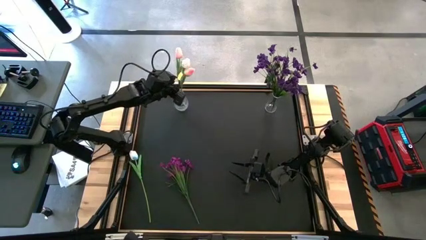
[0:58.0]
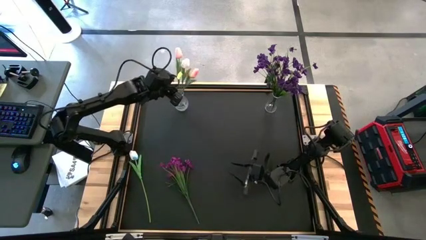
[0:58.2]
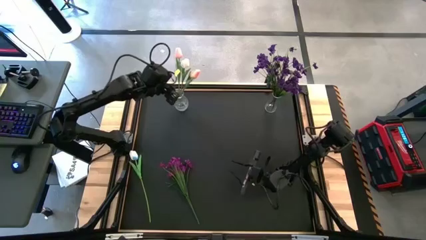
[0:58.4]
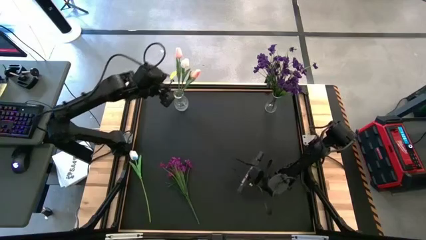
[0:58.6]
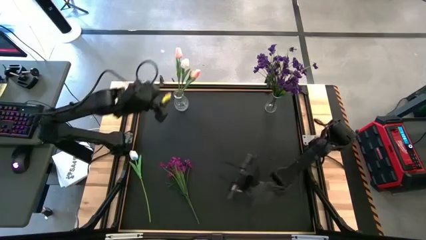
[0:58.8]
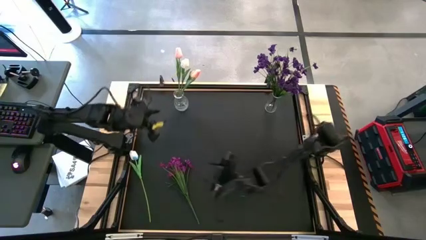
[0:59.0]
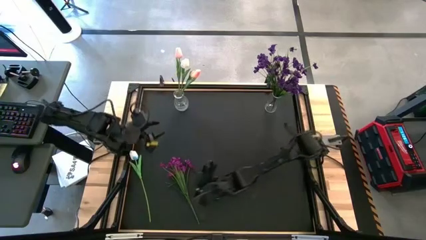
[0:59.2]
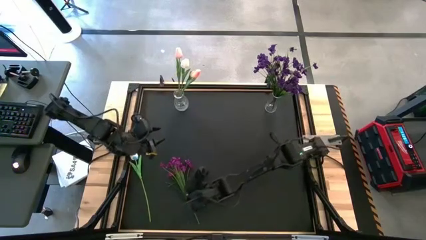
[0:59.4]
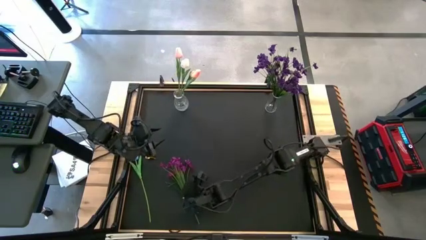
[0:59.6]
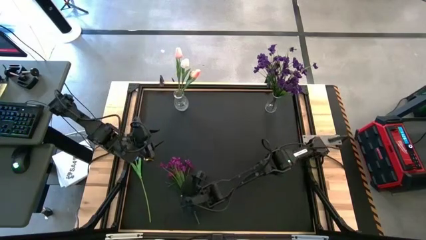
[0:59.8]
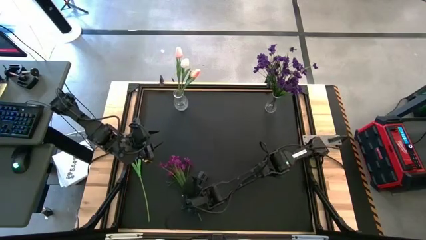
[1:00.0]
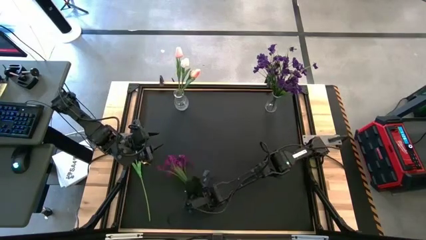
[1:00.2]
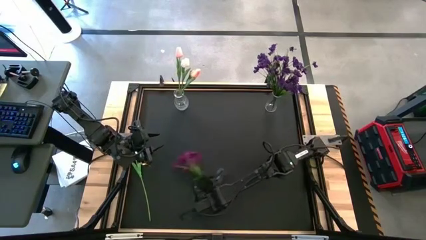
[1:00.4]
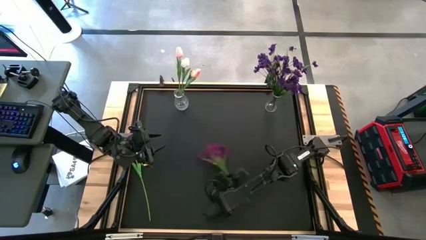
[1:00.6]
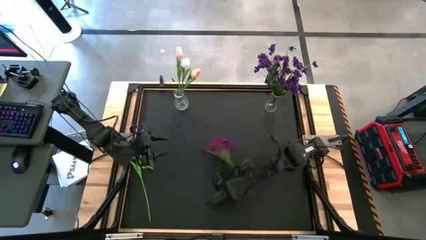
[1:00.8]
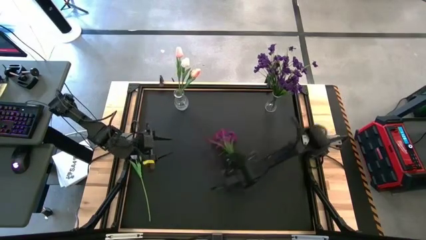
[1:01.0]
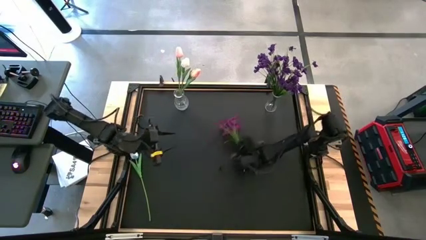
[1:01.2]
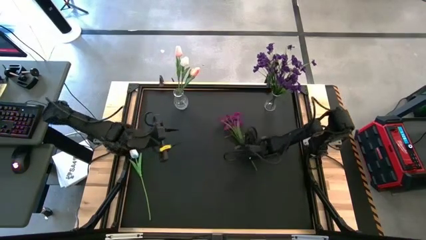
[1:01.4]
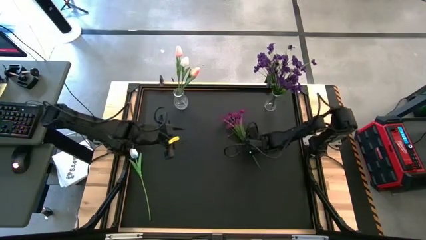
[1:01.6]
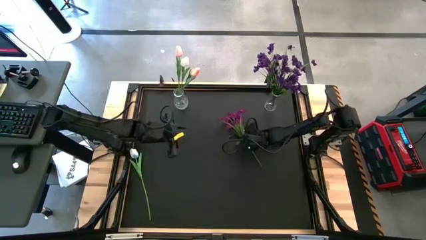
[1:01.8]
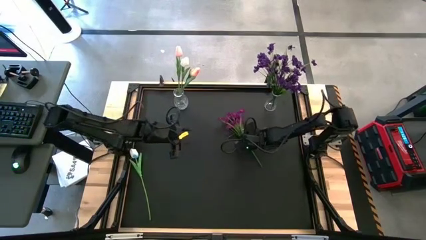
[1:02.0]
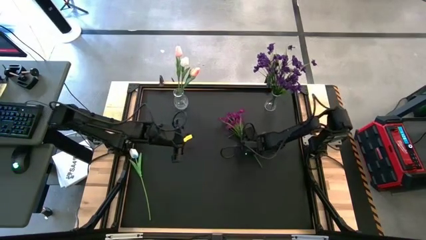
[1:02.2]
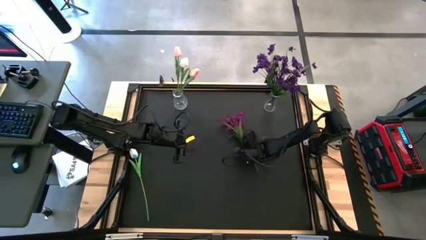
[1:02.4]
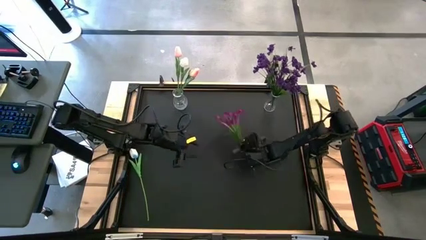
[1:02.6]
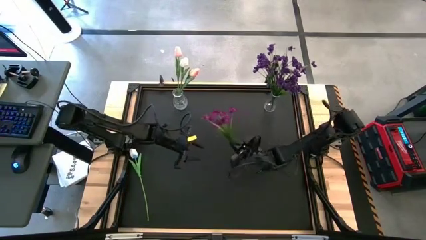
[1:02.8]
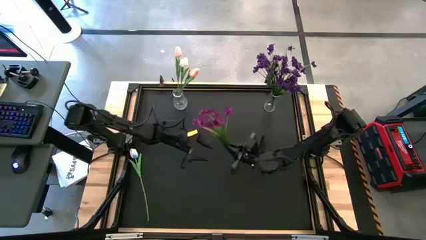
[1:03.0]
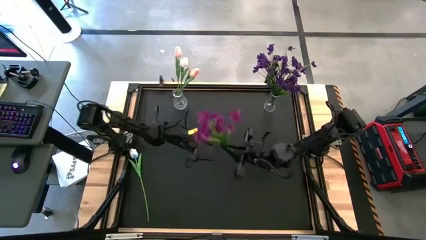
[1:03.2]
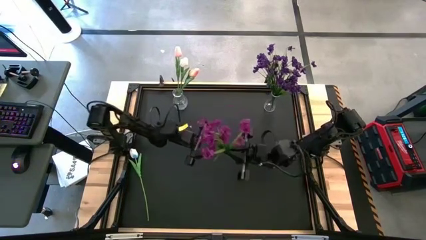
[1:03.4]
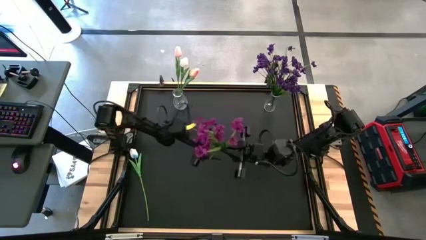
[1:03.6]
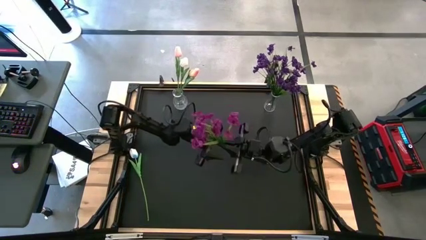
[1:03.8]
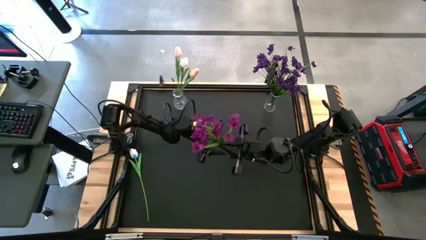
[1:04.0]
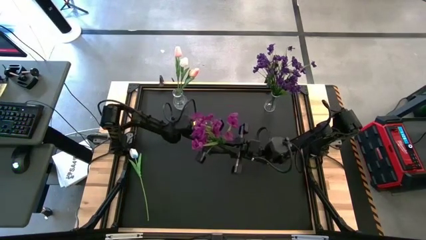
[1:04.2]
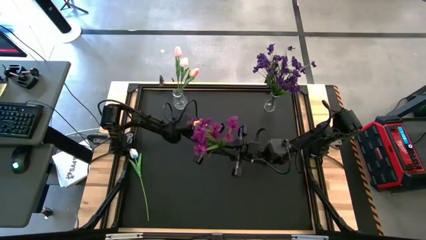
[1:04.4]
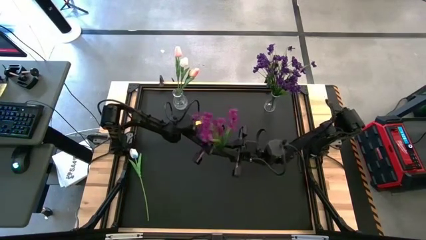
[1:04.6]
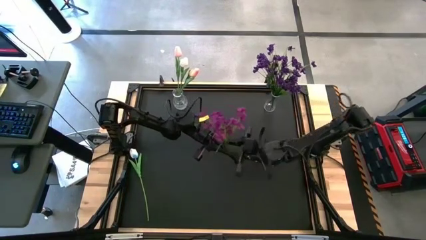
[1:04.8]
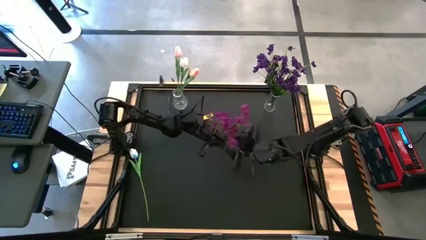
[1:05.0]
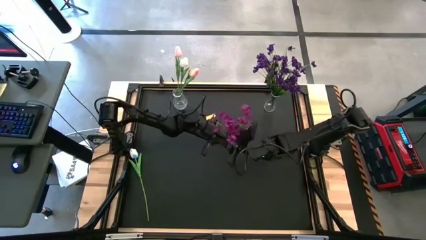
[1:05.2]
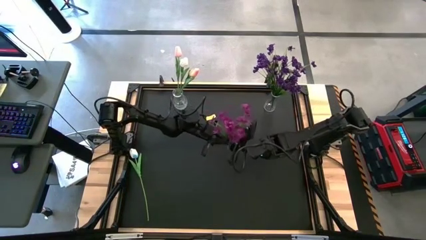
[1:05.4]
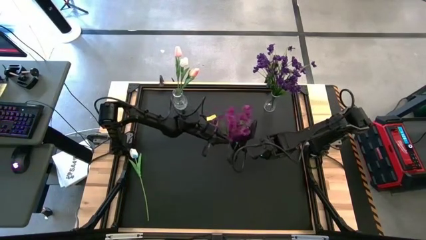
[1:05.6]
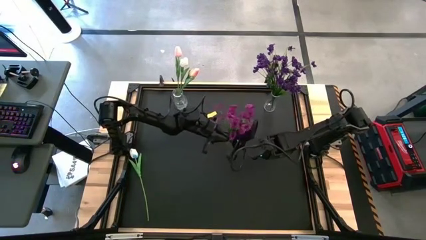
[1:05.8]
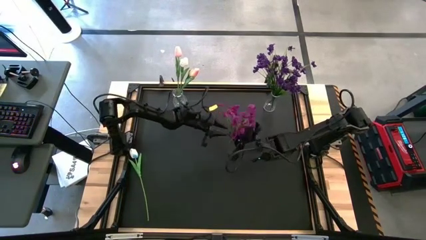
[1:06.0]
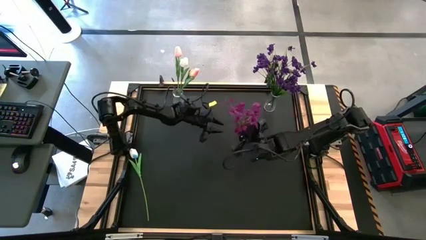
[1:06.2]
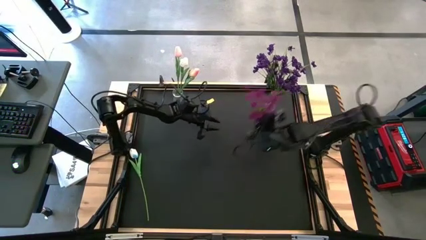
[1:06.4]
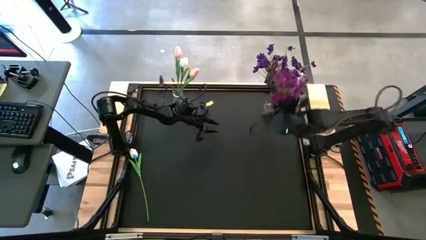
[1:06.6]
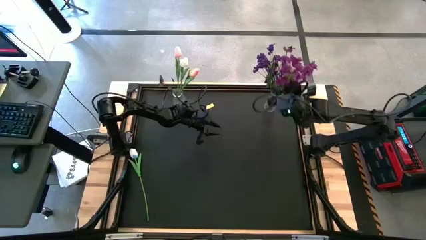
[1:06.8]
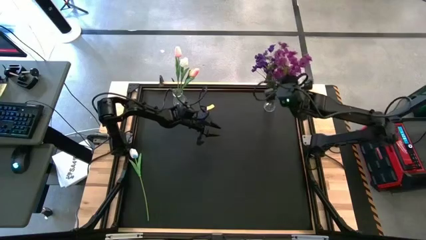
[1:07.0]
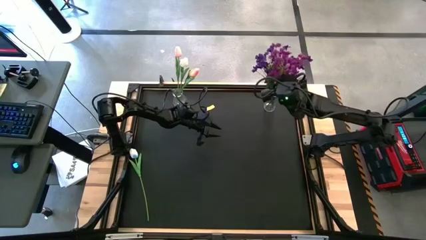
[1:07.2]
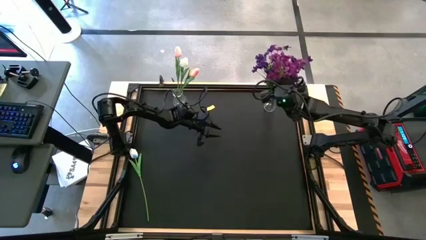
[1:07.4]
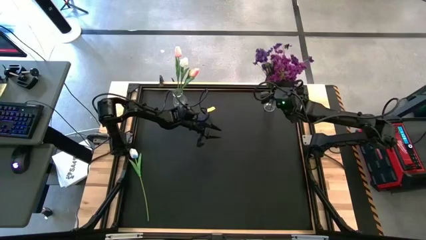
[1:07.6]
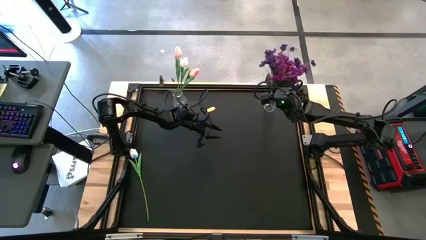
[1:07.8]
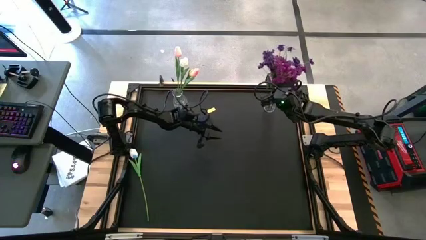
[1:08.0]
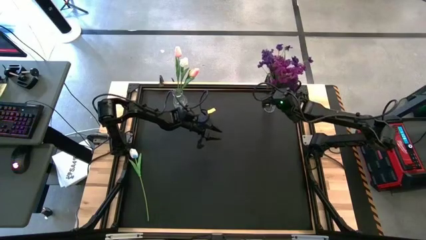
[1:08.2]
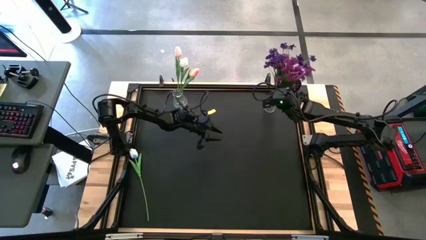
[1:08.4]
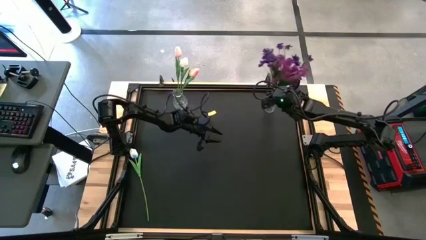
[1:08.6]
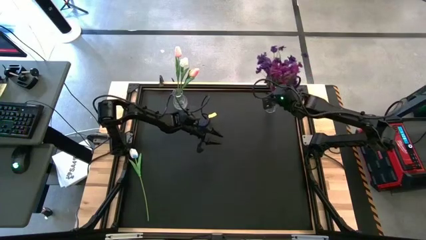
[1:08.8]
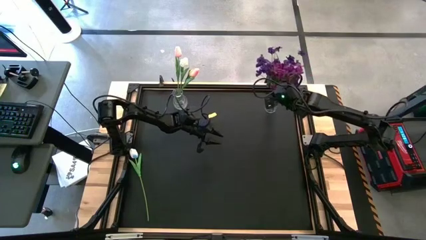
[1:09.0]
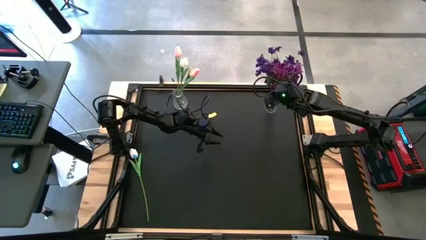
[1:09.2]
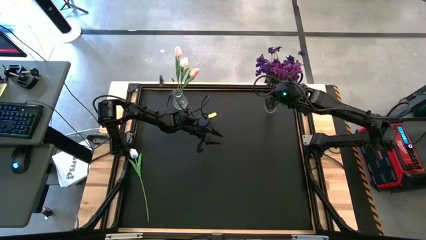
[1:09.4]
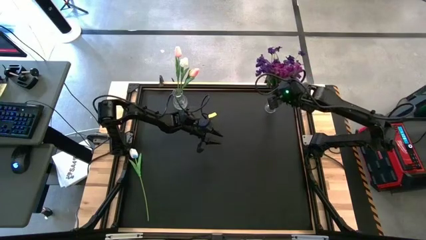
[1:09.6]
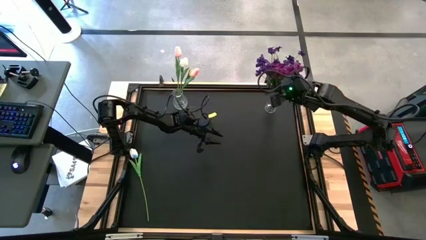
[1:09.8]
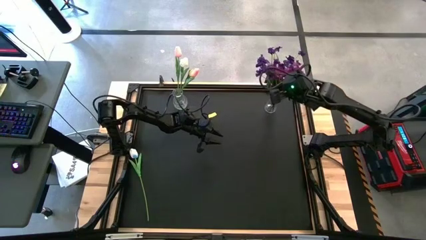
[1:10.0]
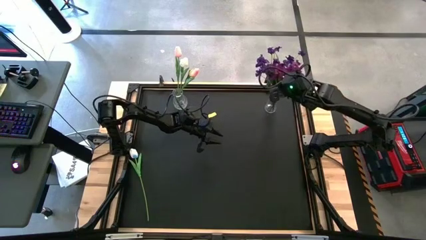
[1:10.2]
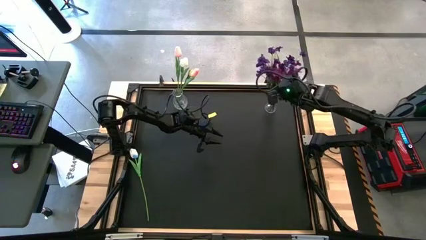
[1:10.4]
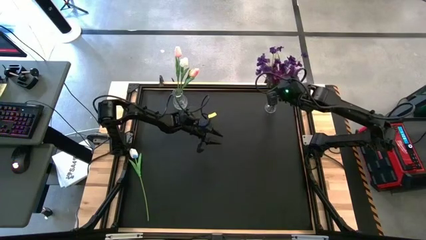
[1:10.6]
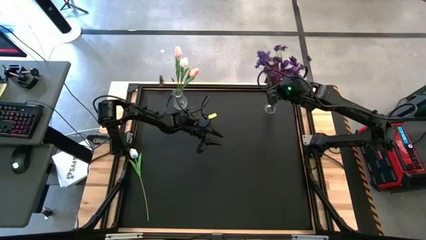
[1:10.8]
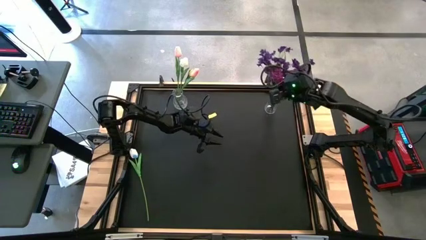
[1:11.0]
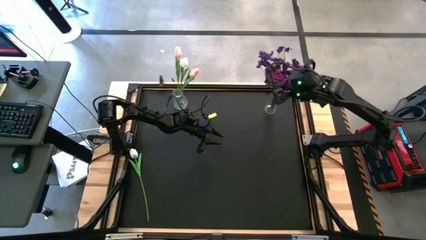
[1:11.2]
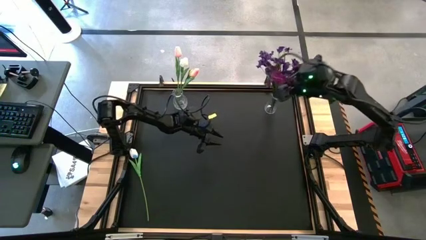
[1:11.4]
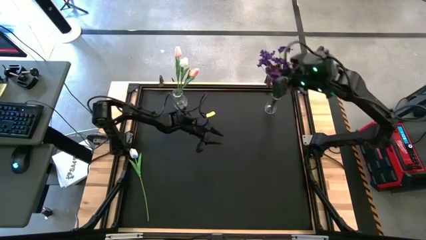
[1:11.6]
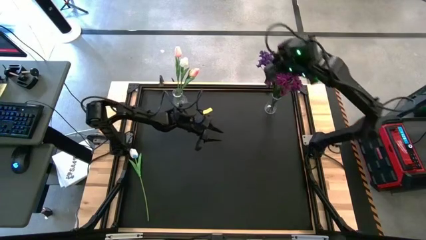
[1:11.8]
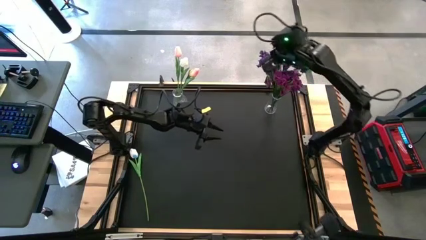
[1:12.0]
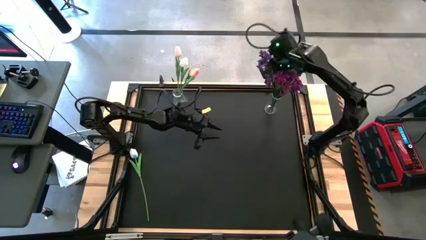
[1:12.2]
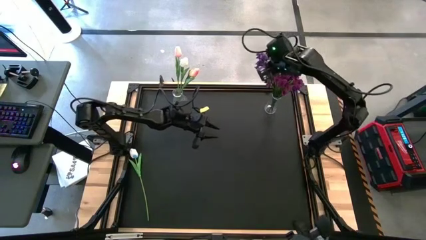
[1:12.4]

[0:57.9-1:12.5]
Task: Sort flowers into vase by color
Put the pink flowers into the right transparent vase
